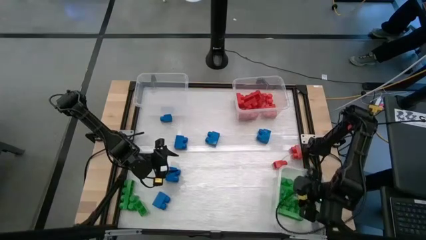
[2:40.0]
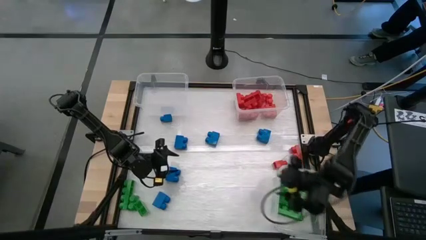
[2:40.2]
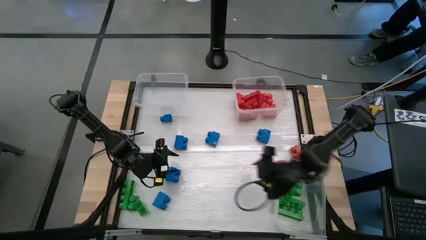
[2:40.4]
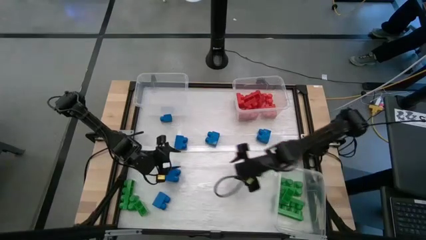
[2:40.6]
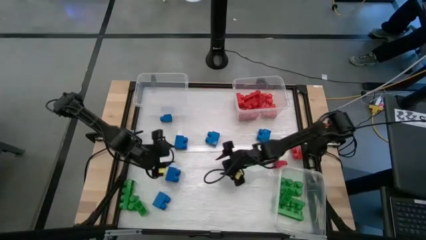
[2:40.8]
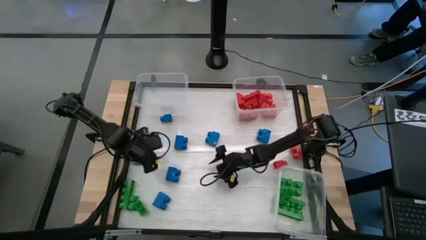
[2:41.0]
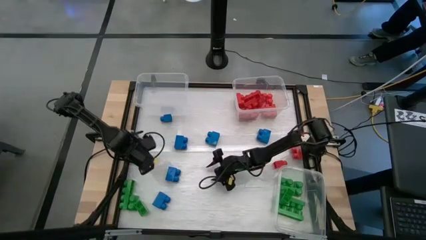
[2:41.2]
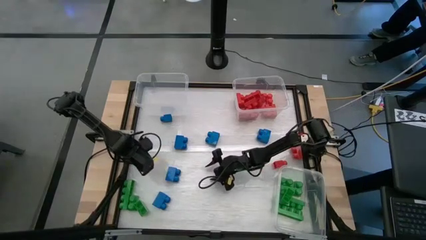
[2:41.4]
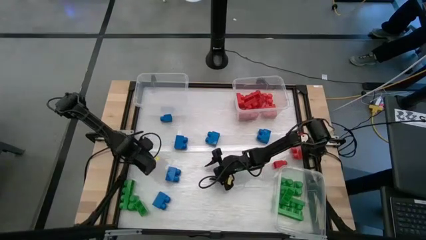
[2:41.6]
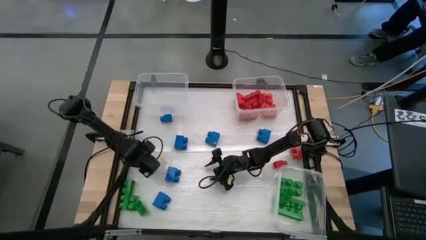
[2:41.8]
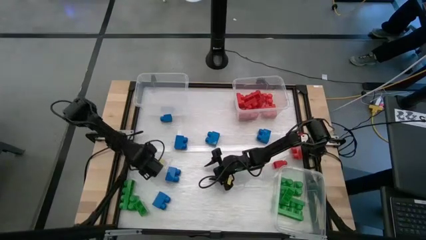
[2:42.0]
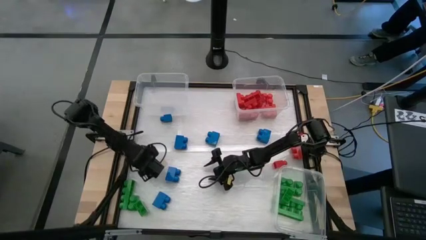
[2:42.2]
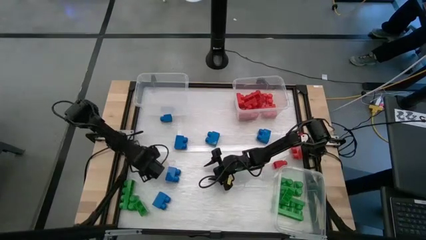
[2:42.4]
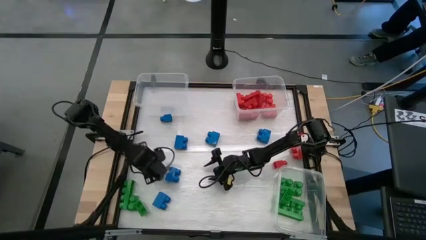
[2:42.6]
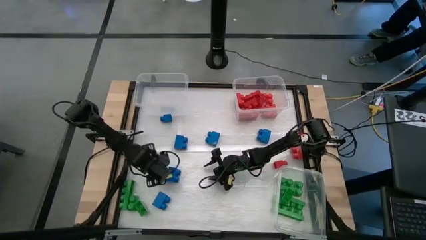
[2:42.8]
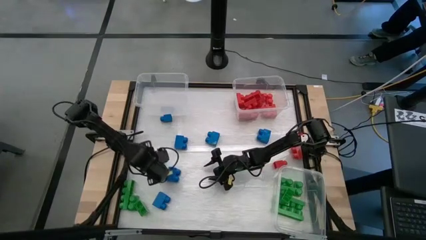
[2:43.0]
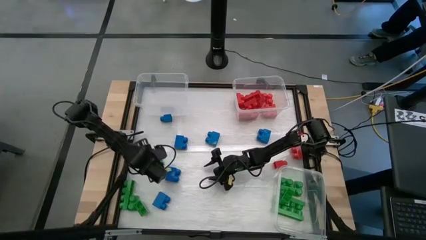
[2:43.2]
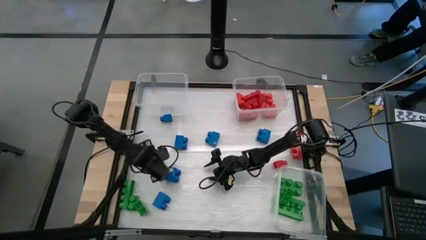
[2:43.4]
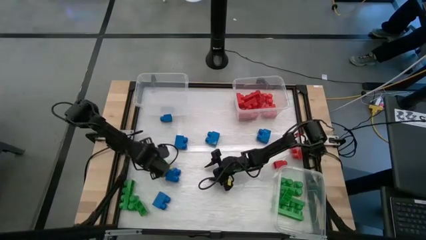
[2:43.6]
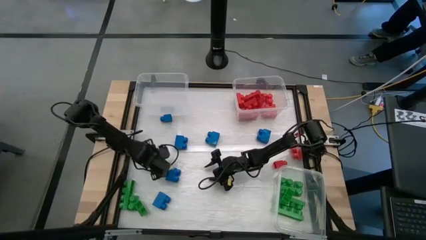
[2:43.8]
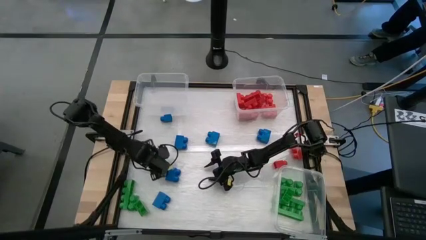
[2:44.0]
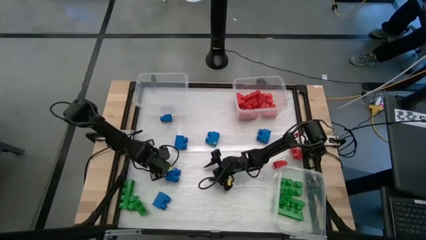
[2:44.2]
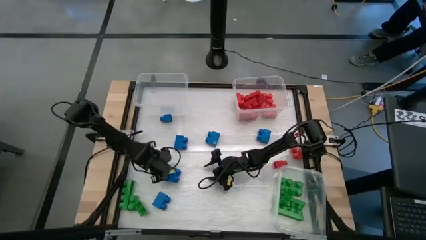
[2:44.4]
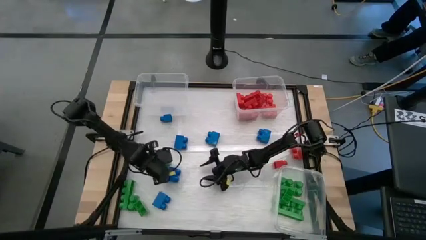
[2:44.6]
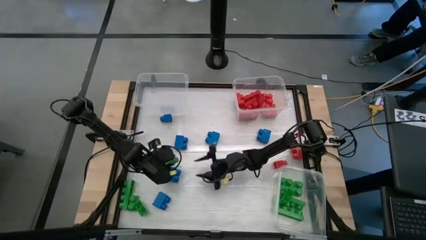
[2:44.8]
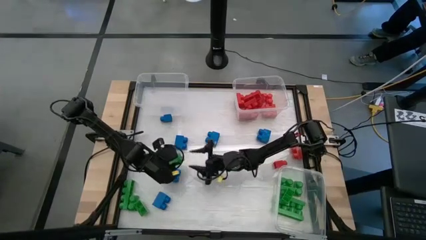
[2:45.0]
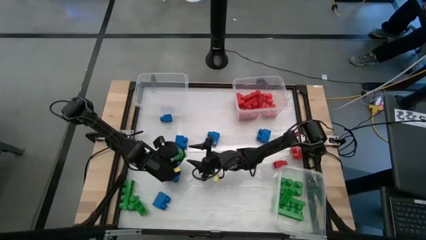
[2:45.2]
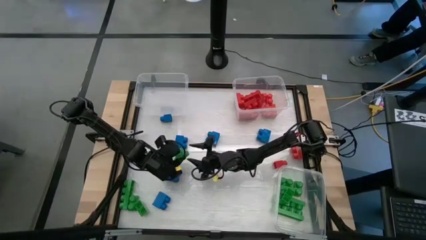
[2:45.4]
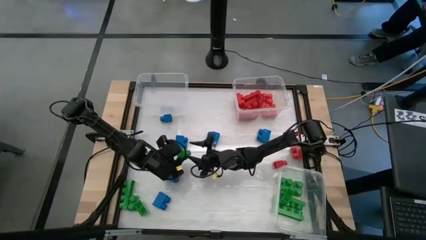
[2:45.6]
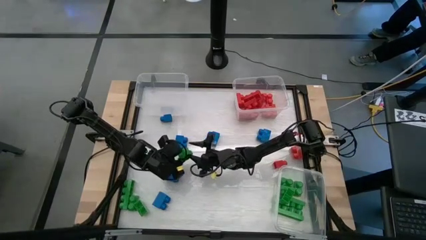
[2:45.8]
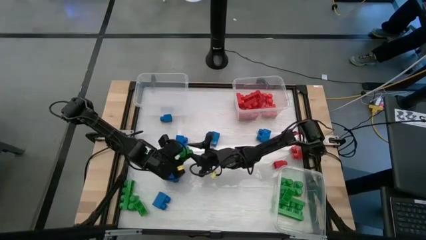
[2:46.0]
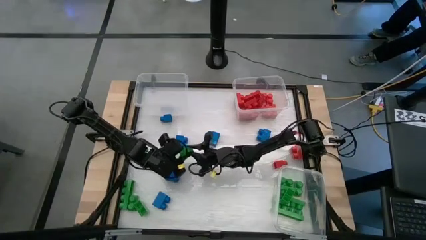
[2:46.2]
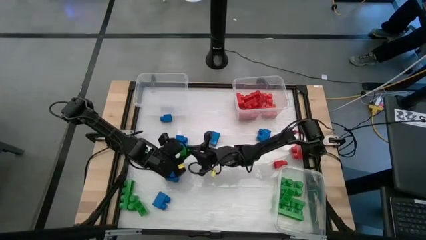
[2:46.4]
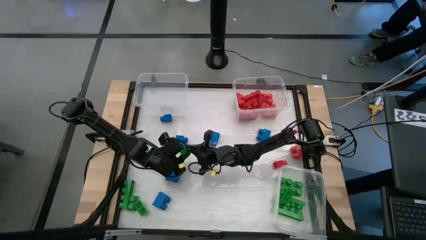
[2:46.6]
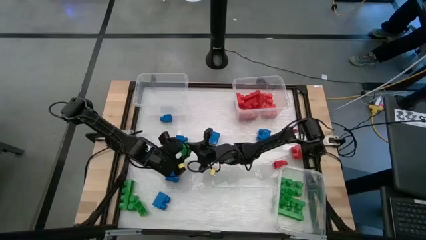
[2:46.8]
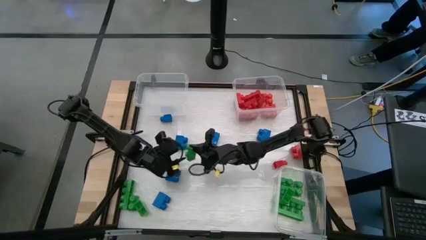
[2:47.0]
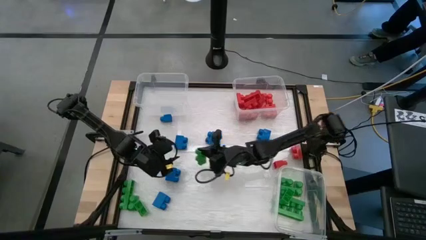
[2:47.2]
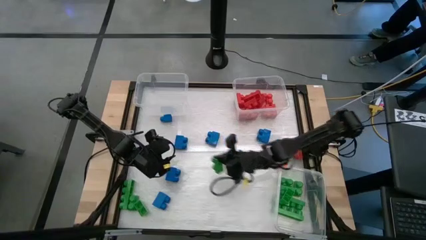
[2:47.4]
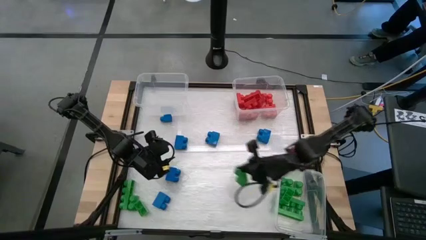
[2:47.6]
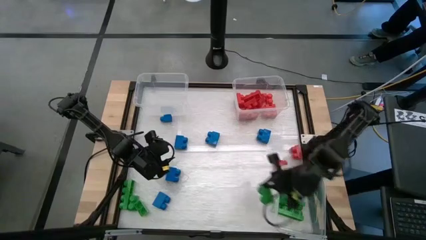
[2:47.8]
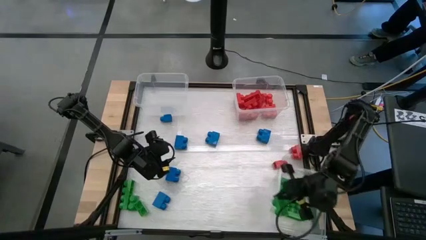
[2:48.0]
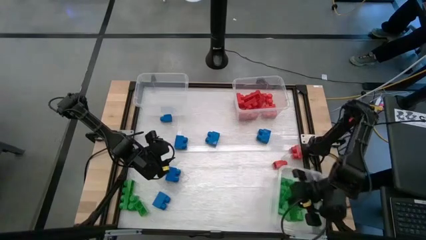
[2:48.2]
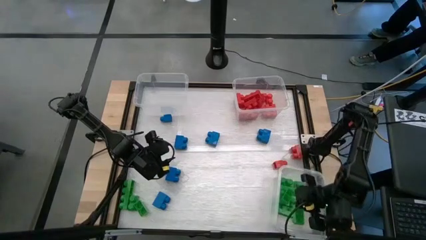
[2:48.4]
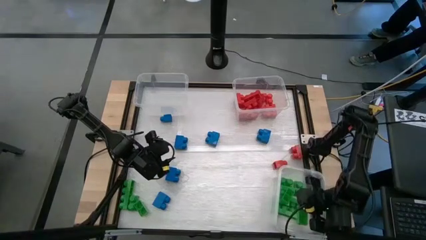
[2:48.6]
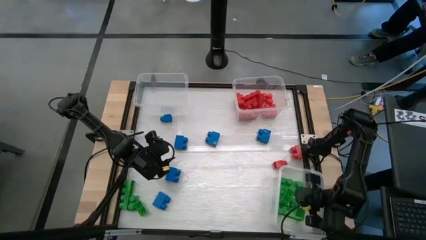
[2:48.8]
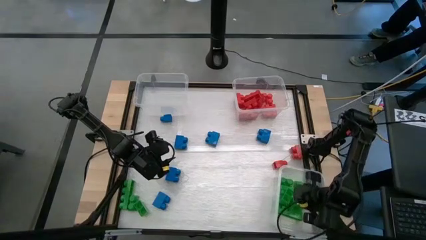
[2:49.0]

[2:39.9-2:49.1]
Task: Sort blocks
Put the green game piece into the bottom right transparent bin

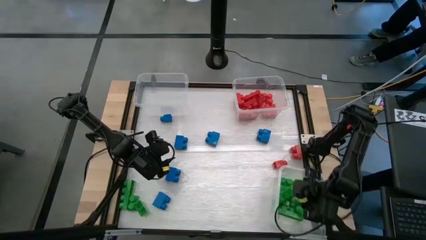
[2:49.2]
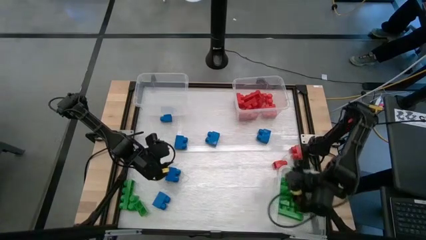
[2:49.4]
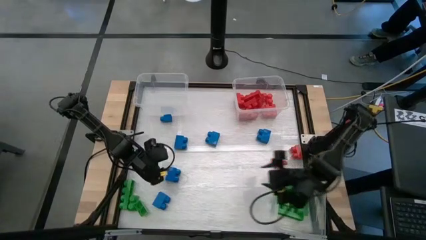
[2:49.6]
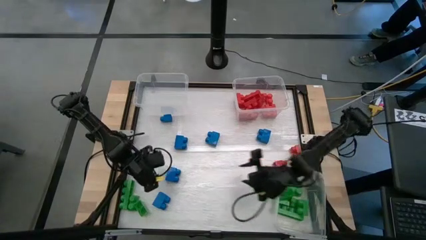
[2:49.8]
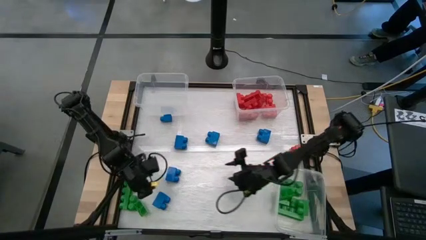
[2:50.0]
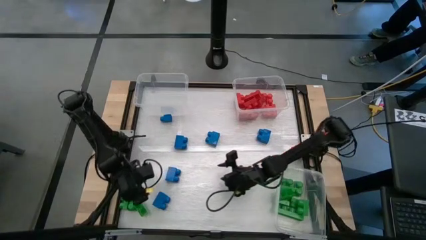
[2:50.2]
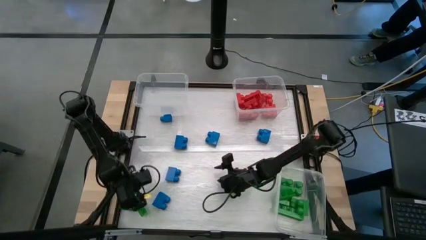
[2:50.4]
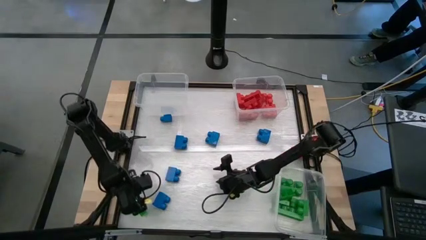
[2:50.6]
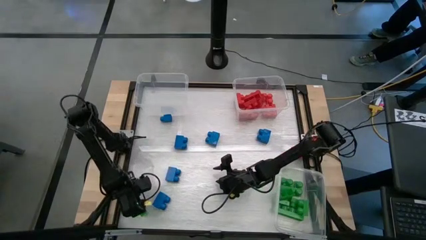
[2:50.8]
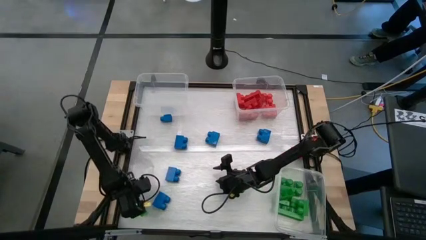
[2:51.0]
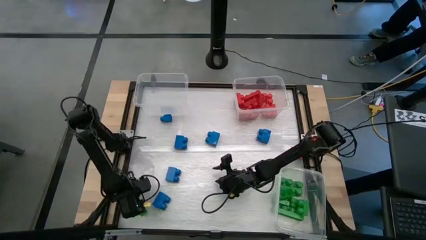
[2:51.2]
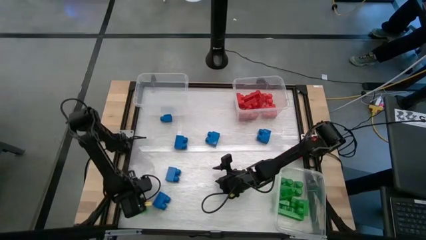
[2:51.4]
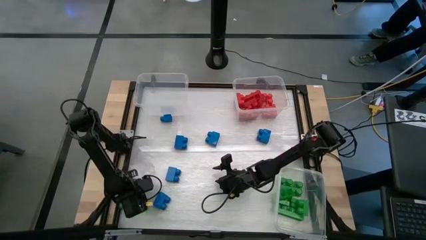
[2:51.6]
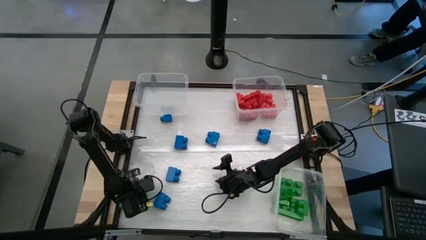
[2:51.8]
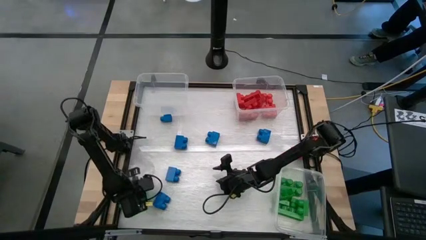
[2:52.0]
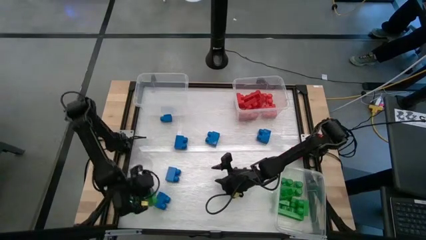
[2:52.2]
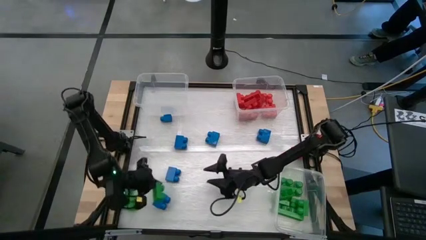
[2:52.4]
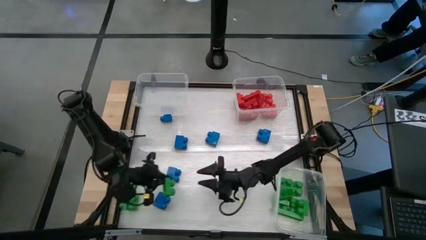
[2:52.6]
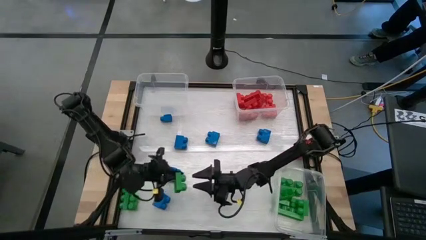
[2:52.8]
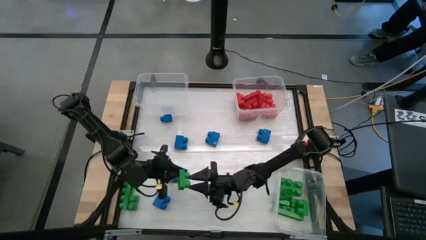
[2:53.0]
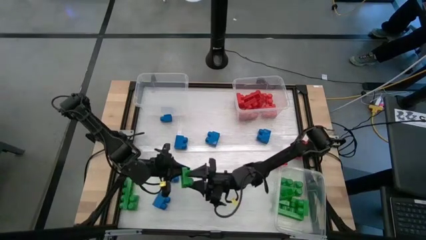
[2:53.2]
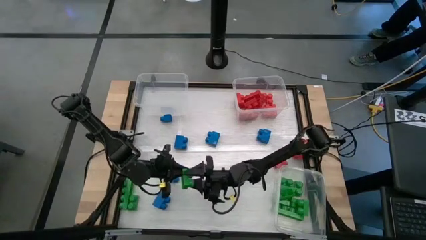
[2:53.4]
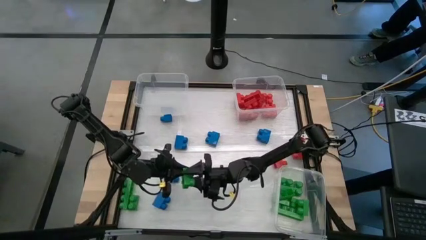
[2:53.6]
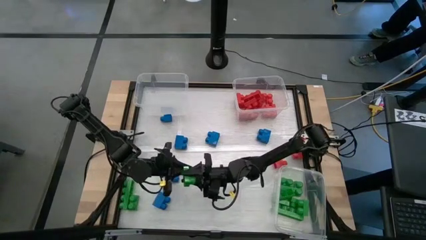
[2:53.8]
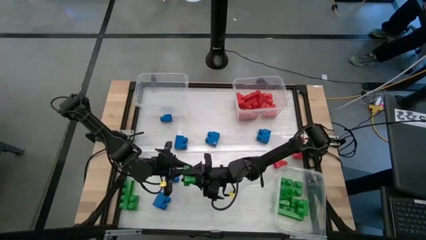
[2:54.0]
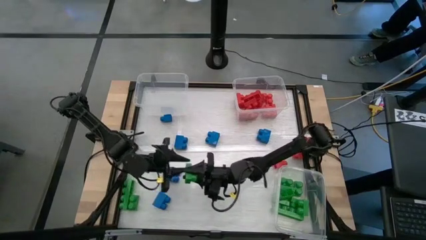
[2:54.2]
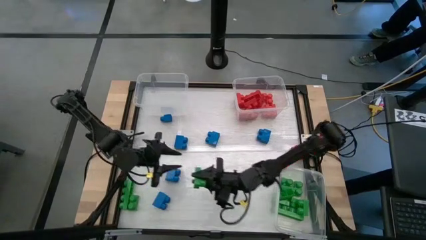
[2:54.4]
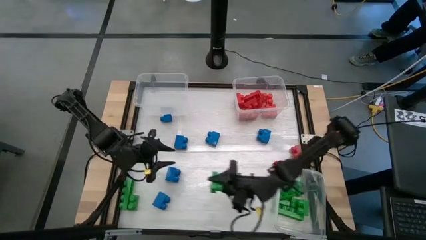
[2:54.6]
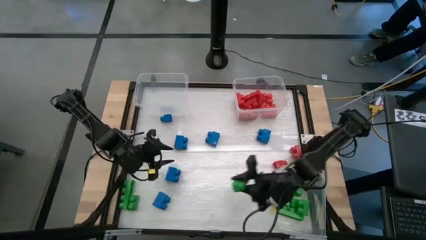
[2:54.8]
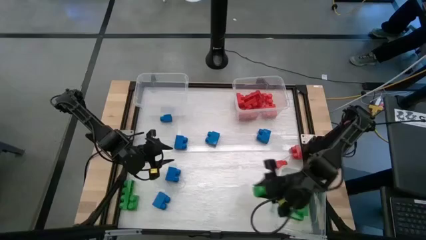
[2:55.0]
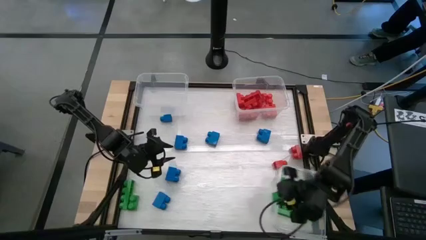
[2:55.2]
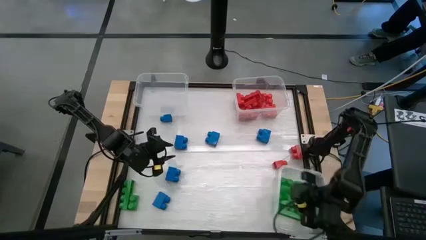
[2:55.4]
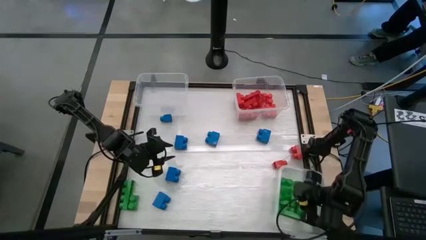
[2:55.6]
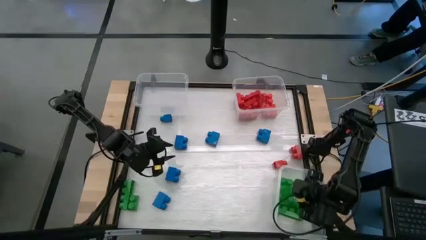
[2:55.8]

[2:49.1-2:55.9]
Put the green game piece into the bottom right transparent bin

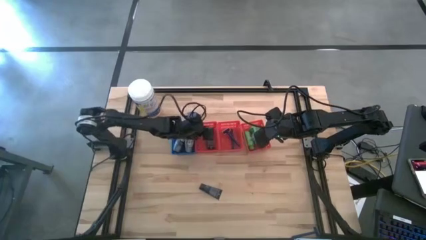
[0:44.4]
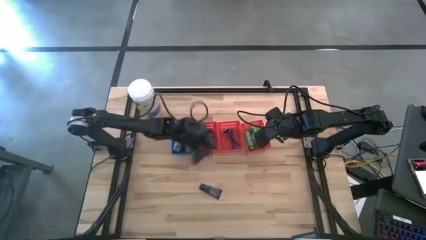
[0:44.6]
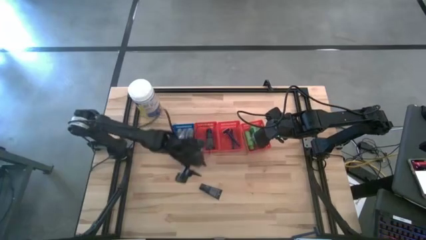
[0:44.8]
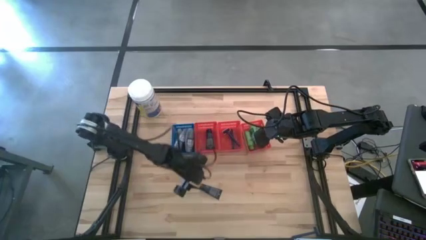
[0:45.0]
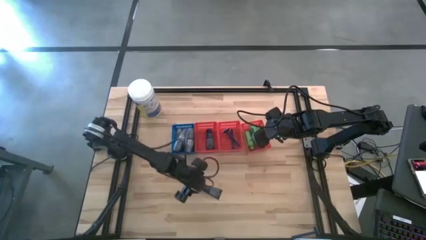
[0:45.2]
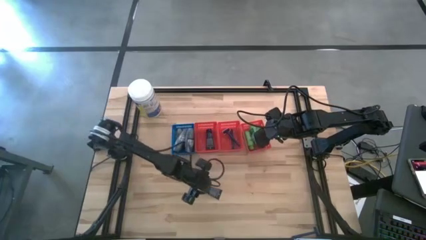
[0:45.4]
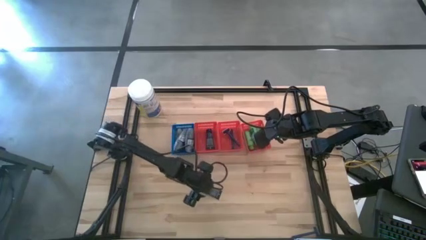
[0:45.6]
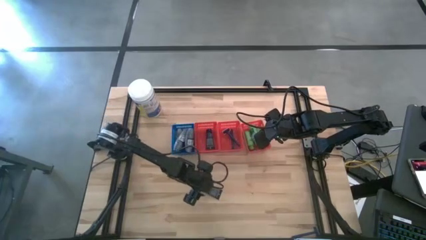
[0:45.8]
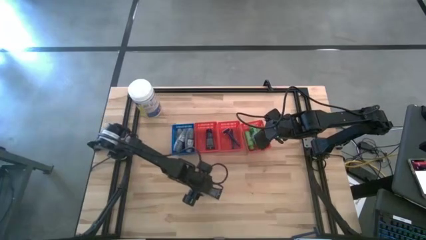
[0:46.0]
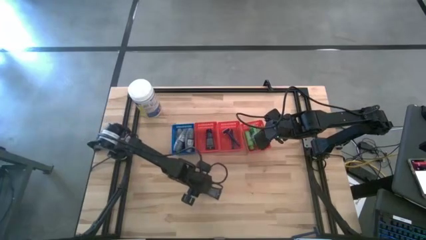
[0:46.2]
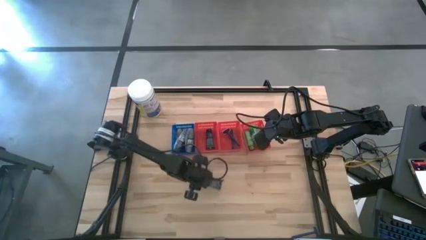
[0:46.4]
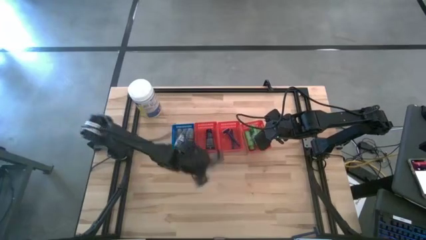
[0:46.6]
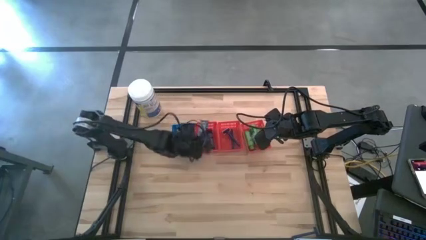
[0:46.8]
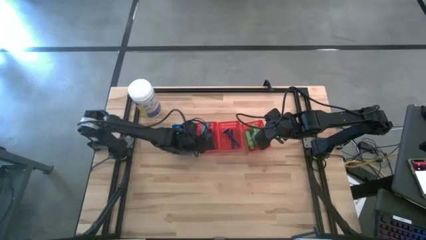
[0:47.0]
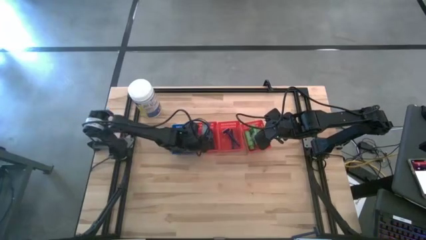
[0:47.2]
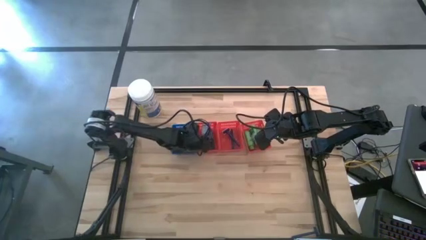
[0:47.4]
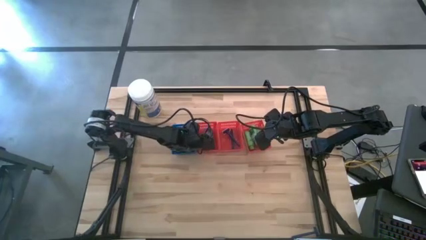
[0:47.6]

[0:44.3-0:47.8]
Task: Pick & Place Travel size toiletries
Put the shave cream into the left red bin
